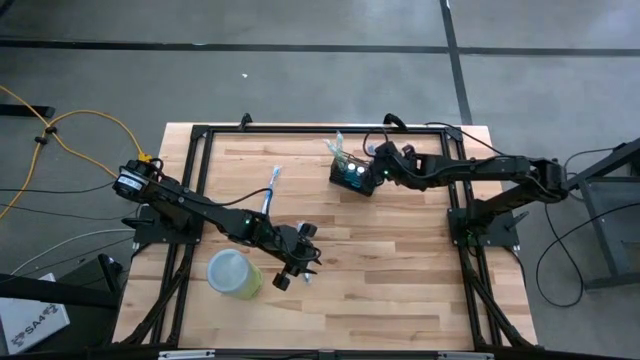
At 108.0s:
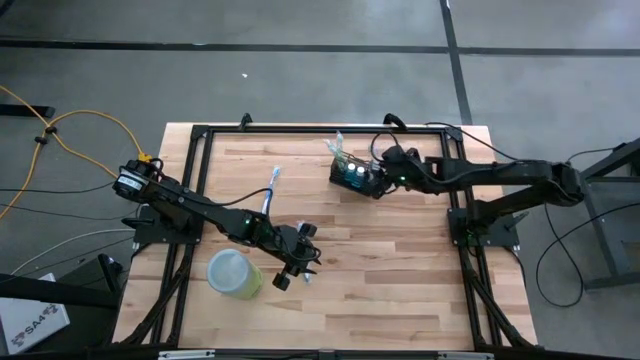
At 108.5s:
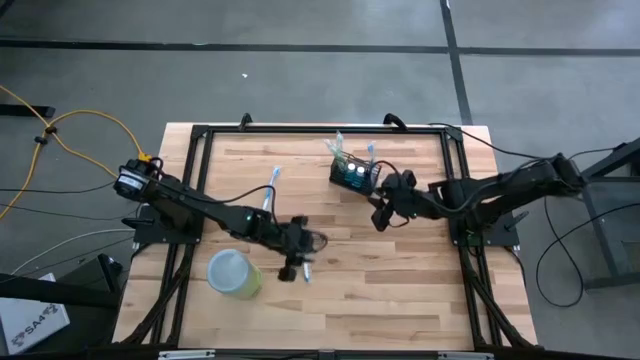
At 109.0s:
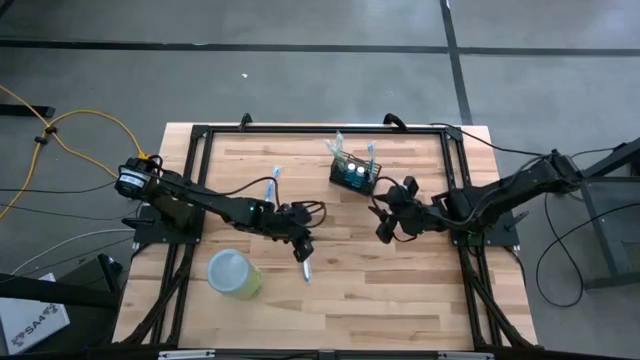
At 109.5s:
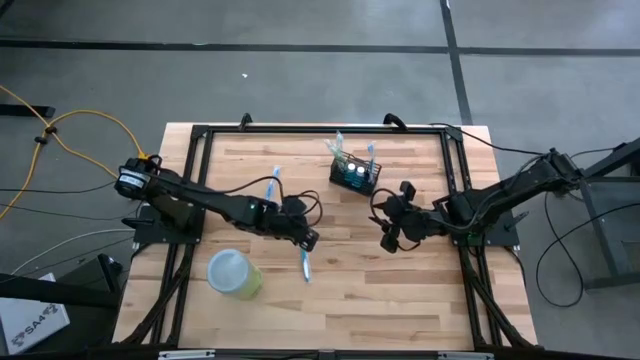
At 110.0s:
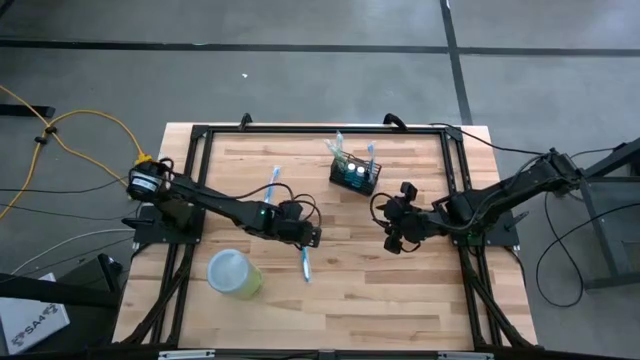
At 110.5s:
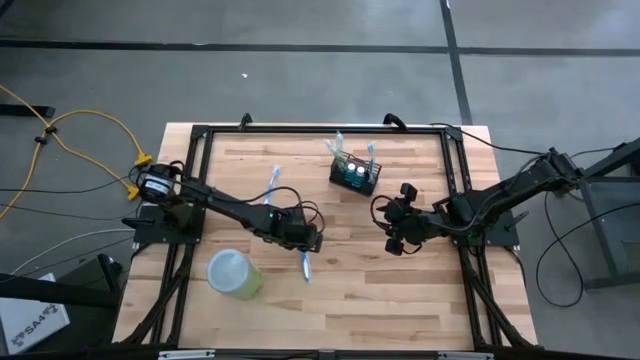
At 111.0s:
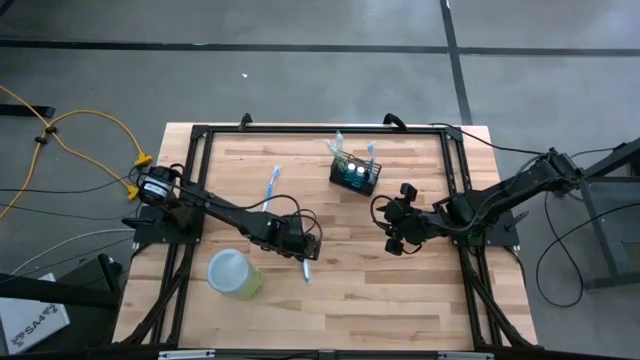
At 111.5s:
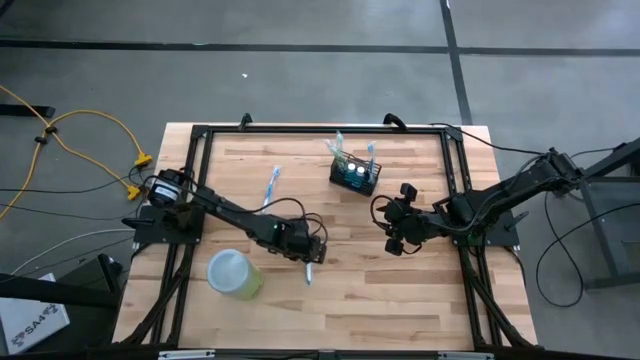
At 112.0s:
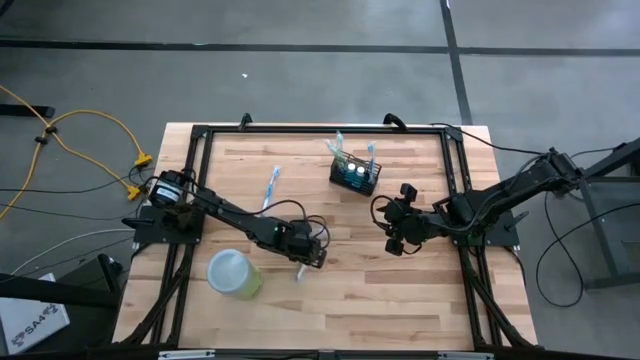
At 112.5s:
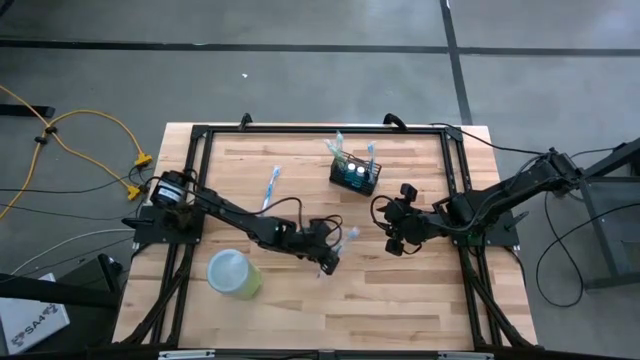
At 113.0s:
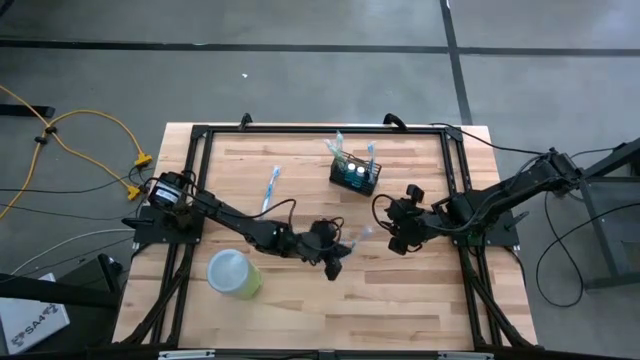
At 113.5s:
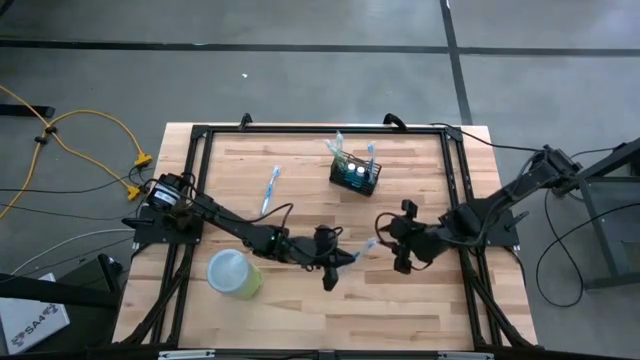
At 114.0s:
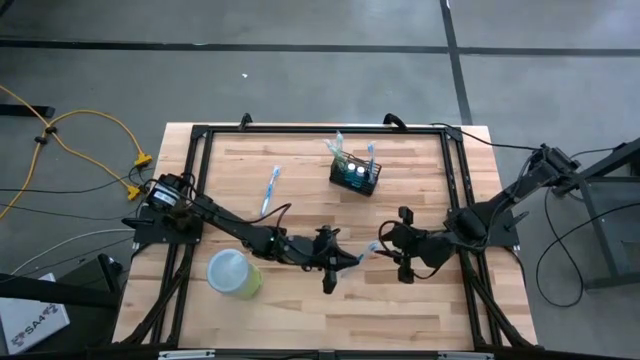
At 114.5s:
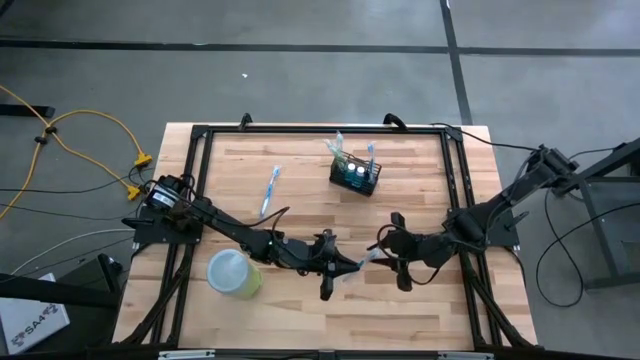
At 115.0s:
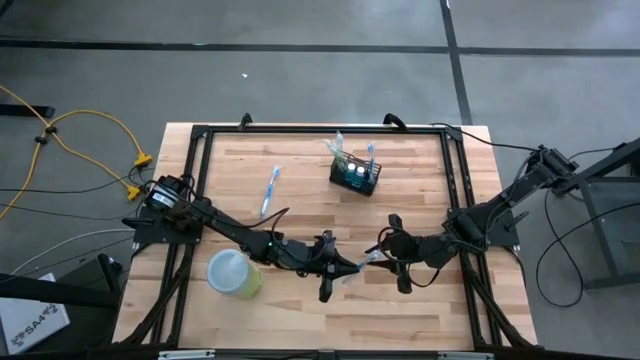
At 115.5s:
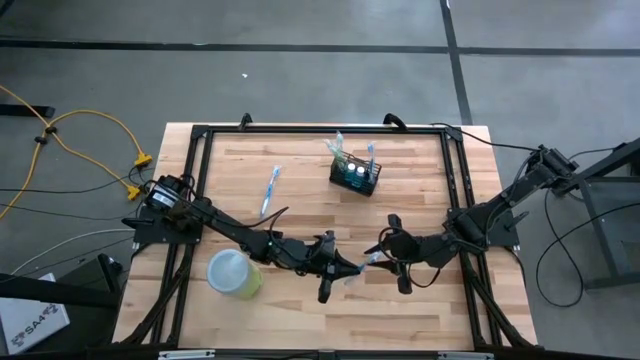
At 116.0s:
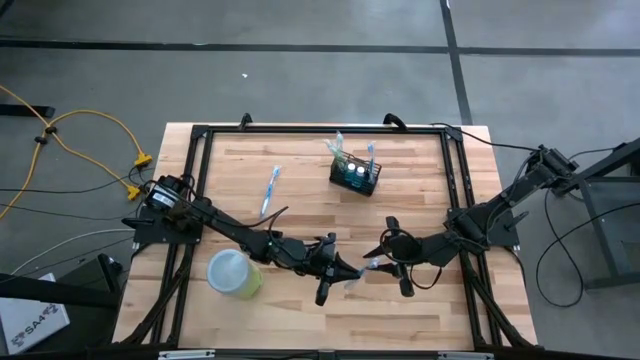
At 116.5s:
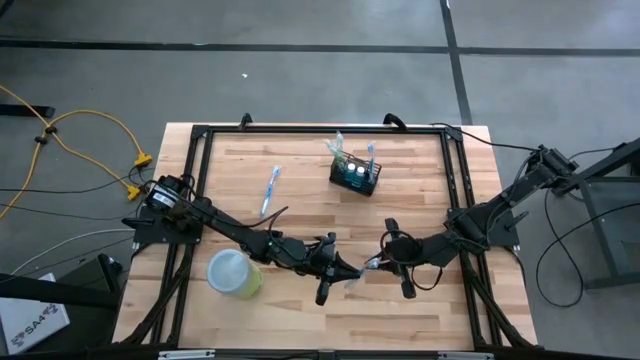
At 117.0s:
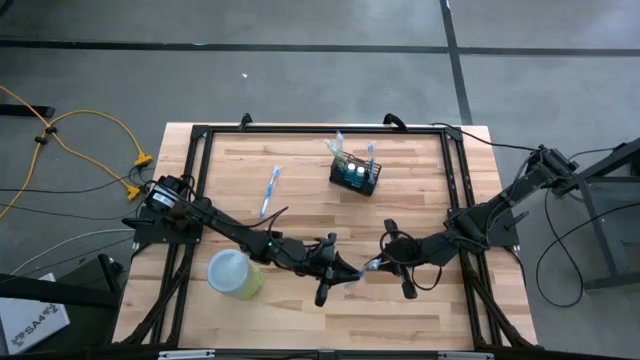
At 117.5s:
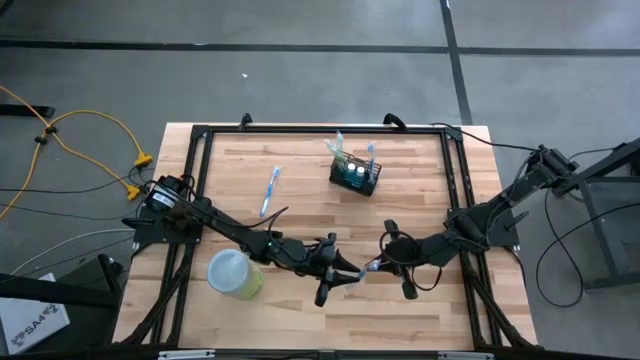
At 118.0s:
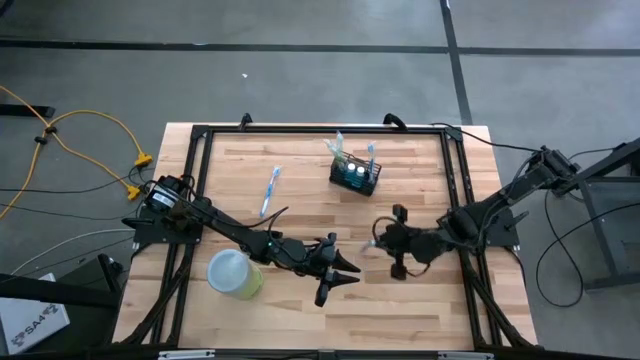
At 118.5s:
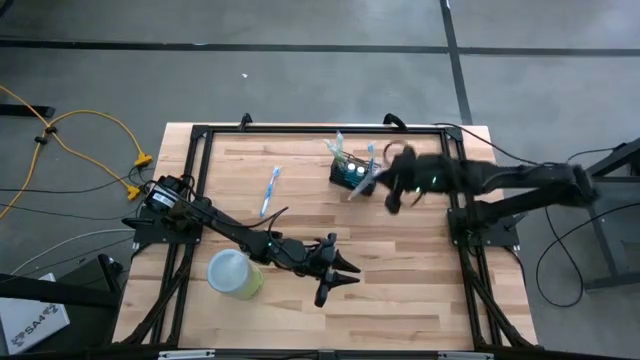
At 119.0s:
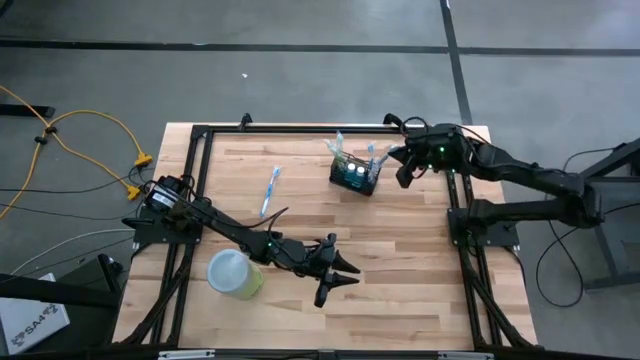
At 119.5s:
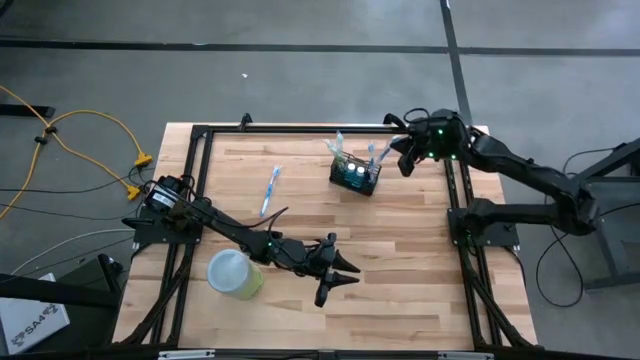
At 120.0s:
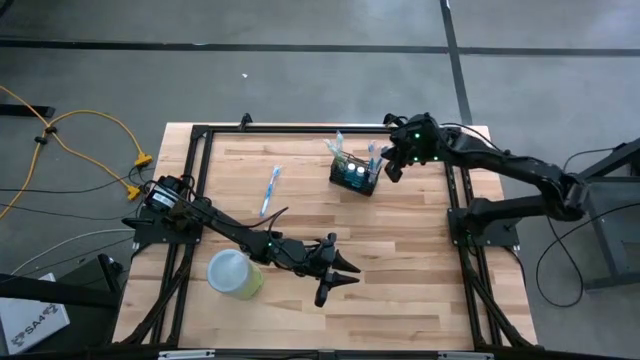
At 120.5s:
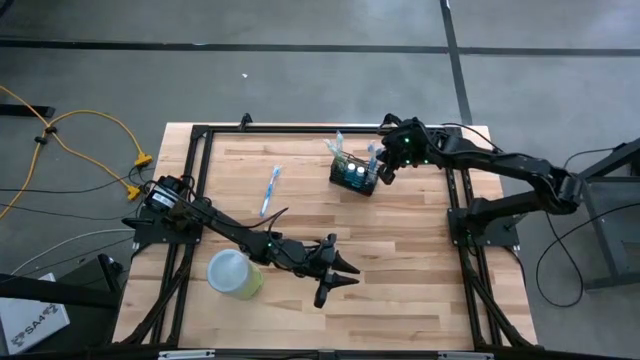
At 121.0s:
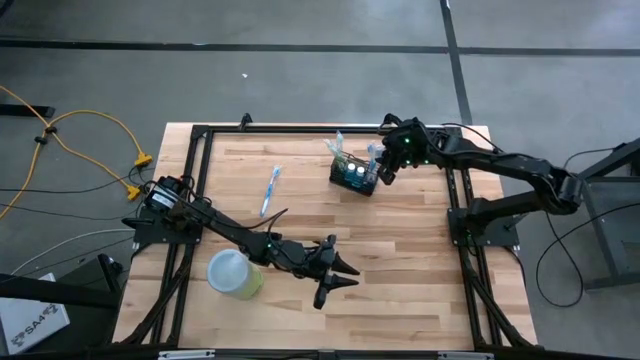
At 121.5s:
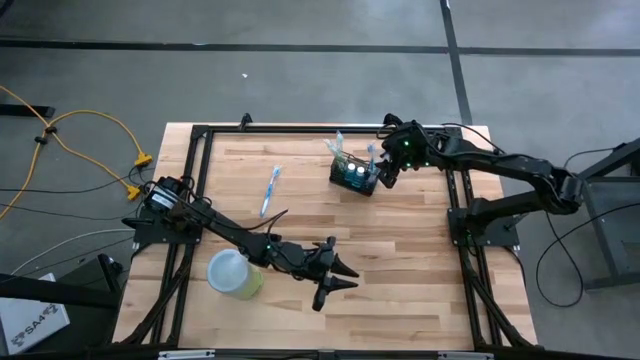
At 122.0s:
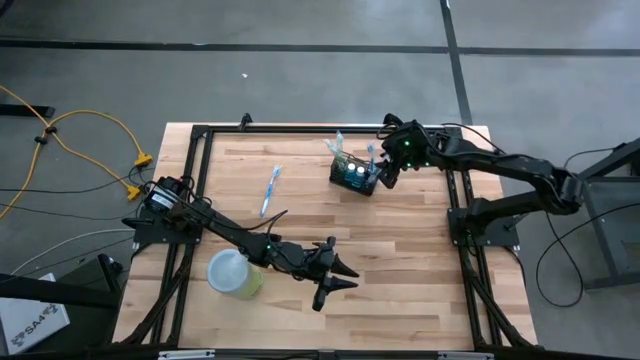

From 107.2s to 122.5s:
Task: Pick & Place toothbrushing station
Put the right blue toothbrush into the right section of the black mesh organizer

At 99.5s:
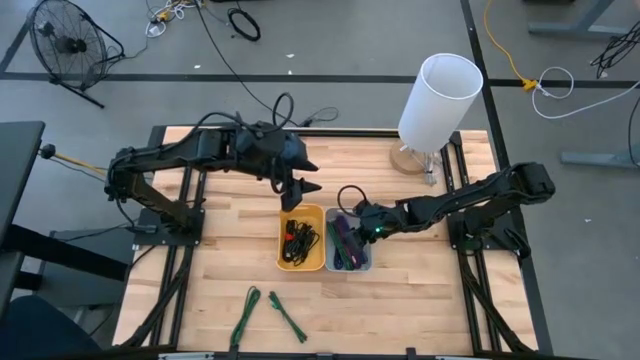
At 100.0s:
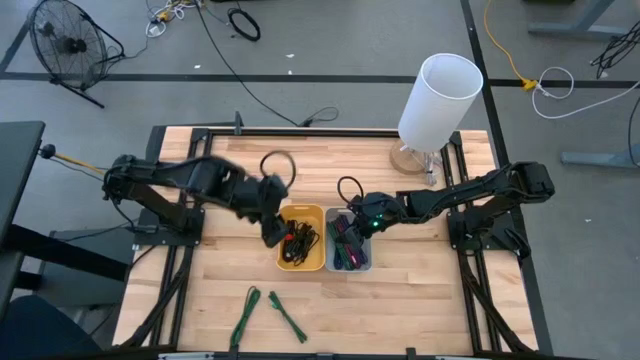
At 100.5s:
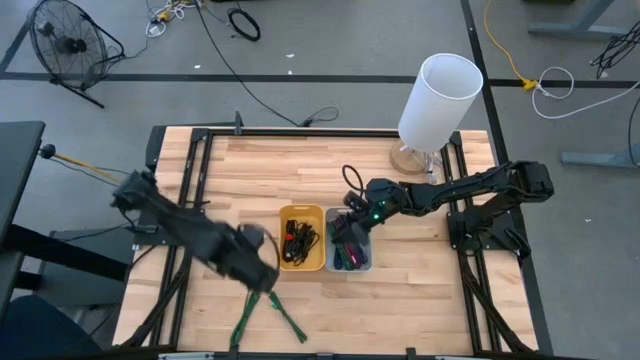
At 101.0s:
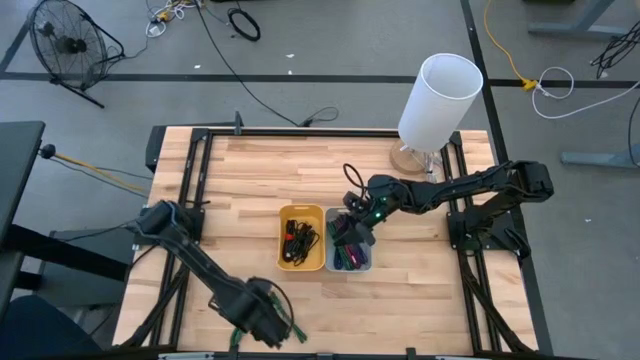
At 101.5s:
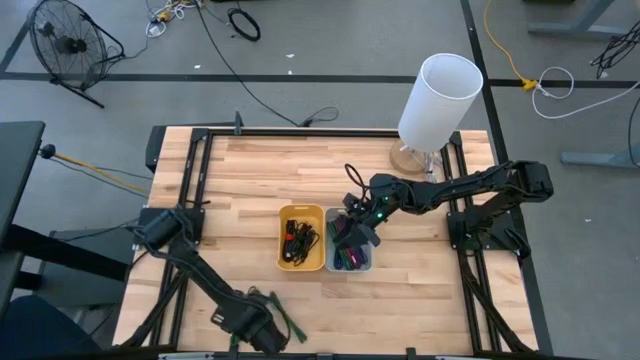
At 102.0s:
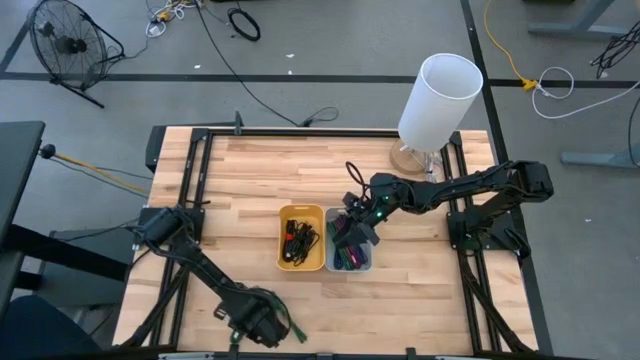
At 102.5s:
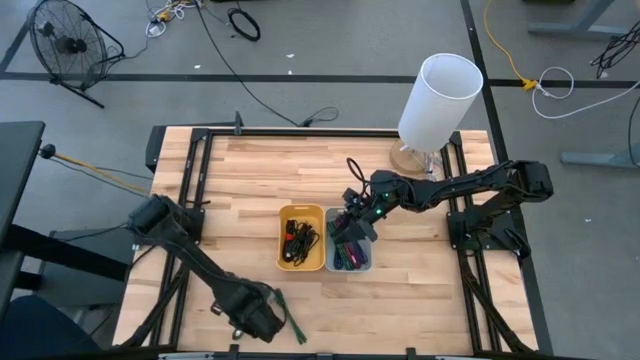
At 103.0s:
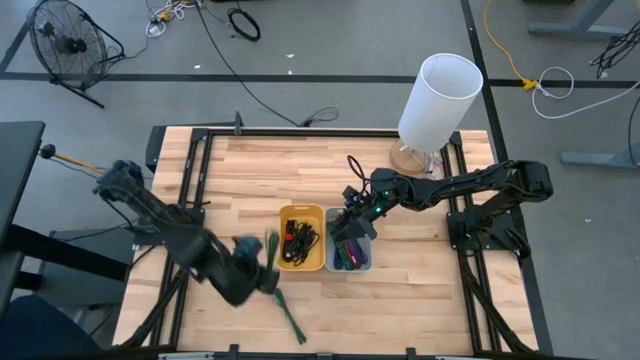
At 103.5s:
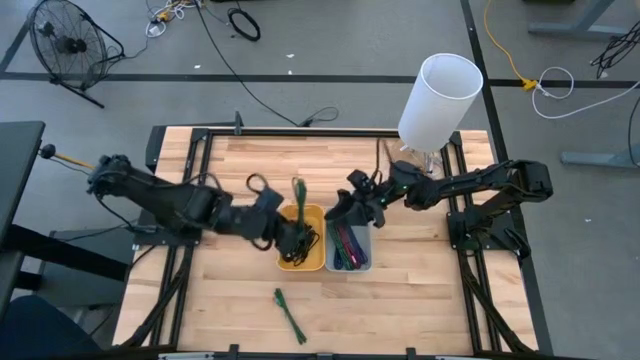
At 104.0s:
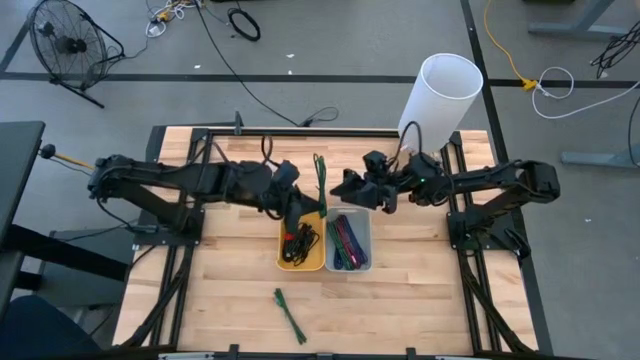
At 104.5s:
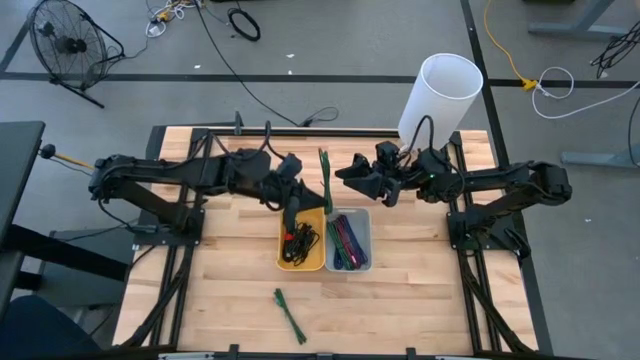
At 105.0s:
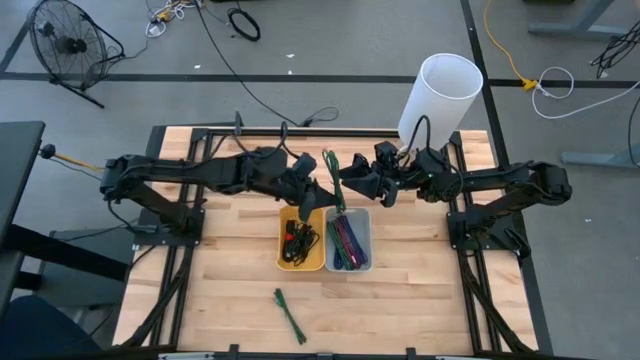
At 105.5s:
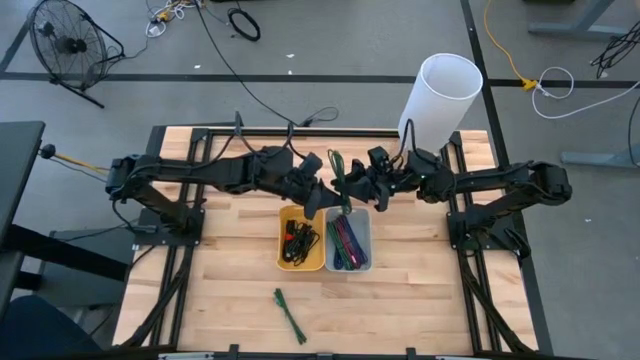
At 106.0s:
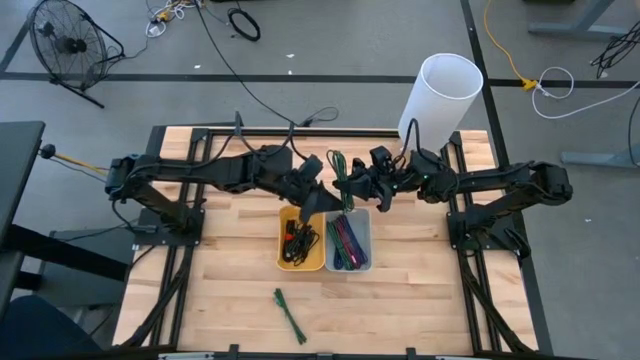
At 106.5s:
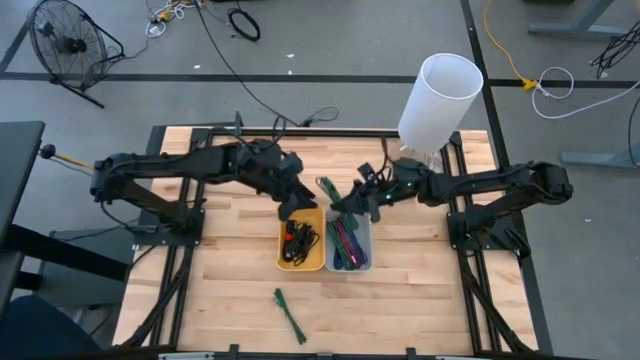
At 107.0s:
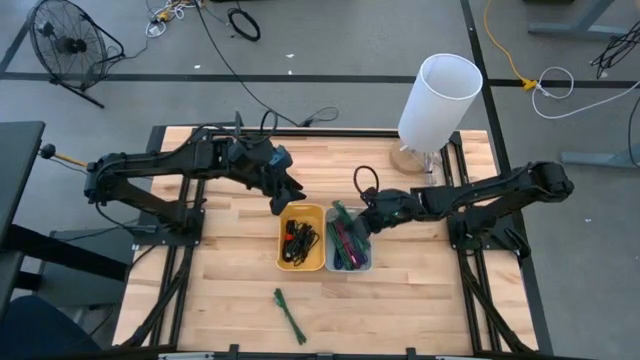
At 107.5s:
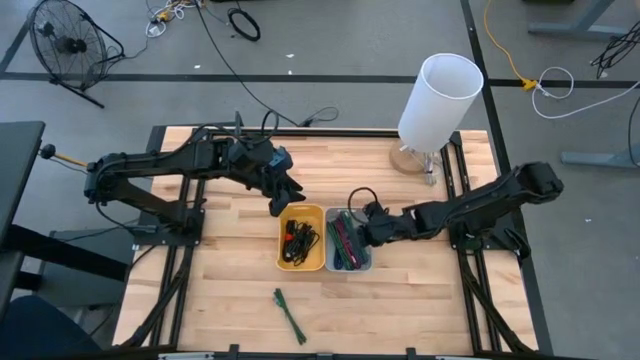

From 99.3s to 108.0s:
Task: Pick & Place USB Port
Put the black green charger cable into the gray bin
